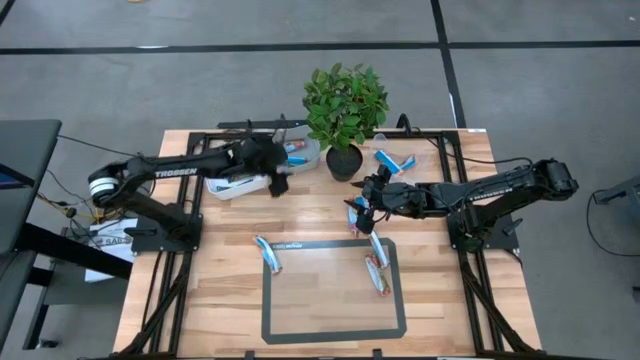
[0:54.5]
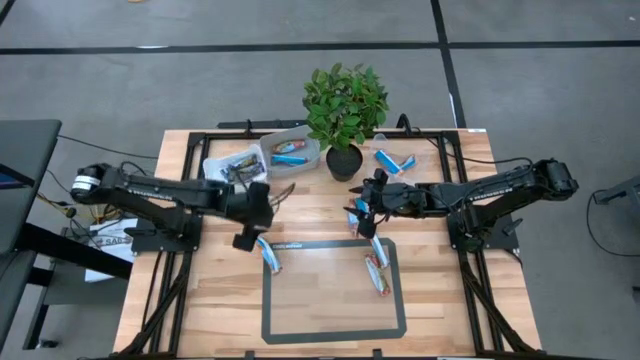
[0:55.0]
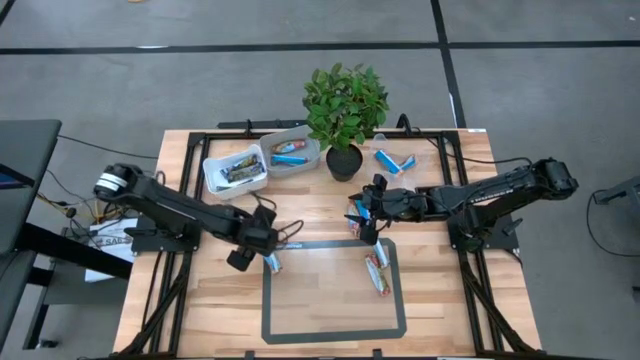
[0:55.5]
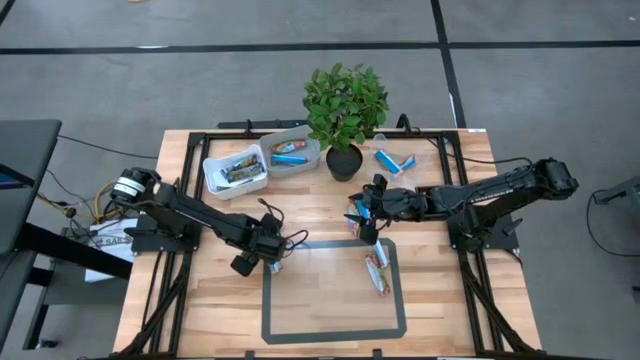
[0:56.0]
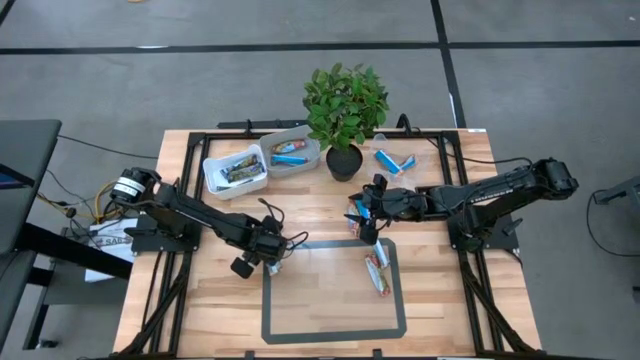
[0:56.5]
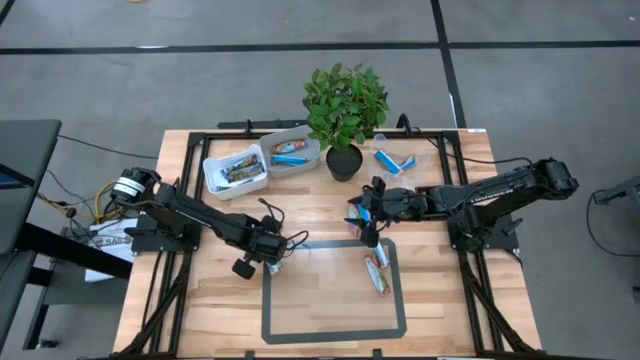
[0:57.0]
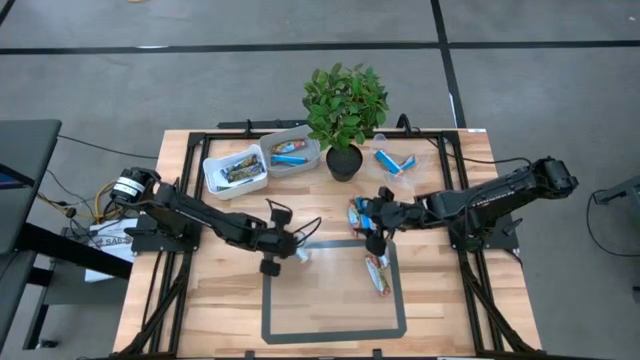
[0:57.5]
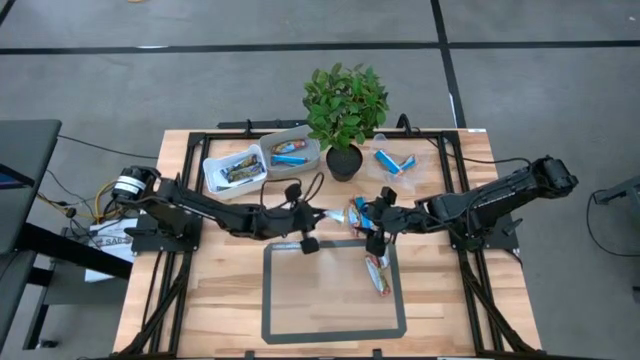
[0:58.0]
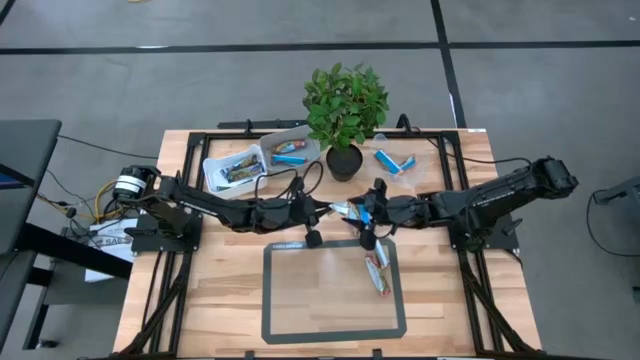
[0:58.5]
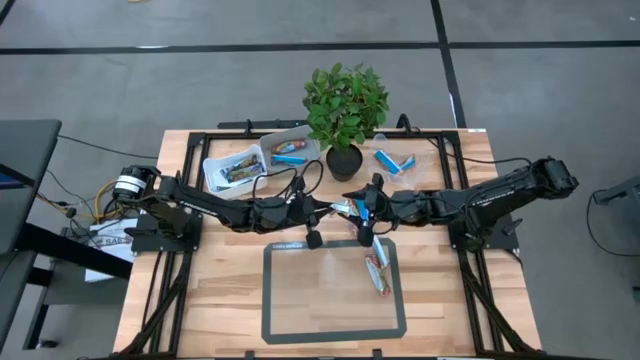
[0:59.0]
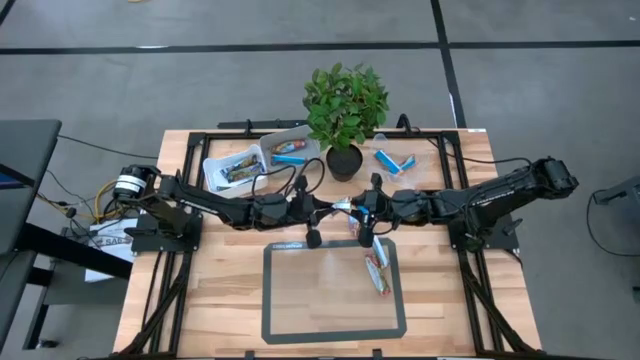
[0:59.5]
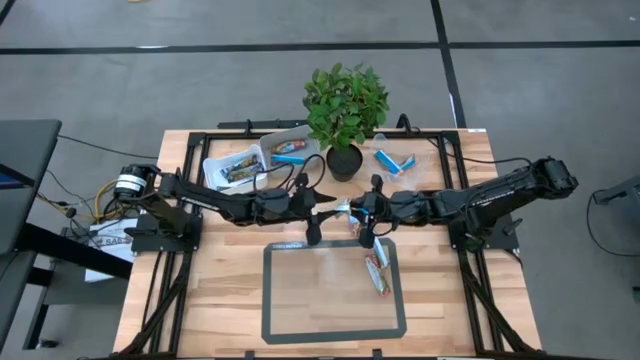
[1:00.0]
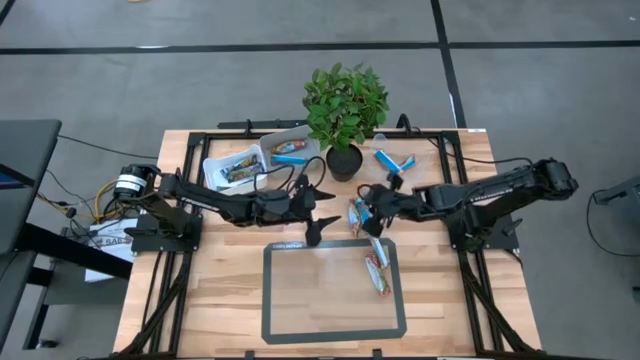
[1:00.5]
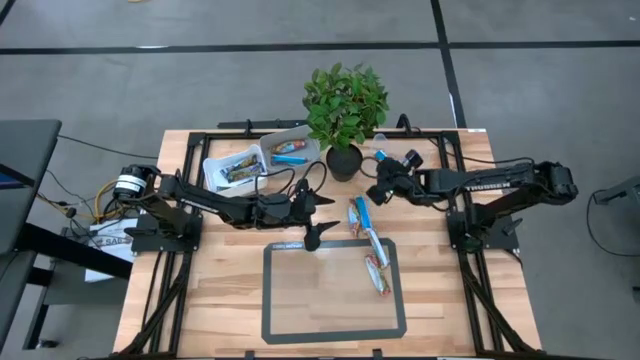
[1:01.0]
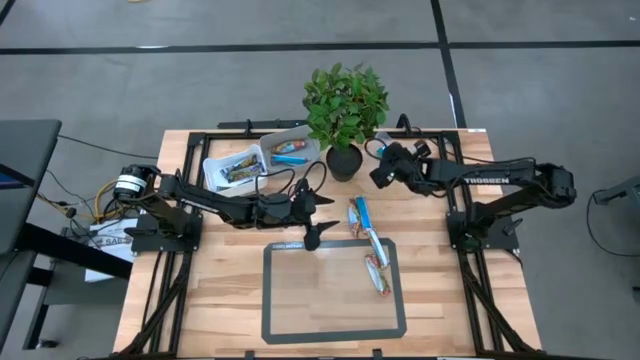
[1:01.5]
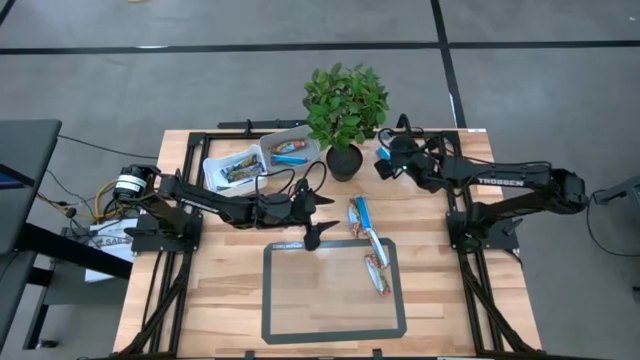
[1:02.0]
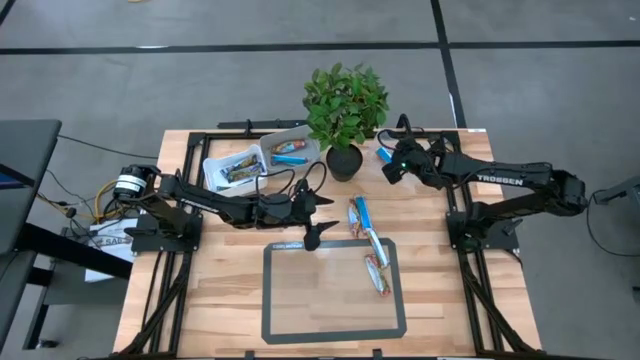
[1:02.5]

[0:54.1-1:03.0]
Task: Pick and place Granola Bars by type
Put the yellow granola bar into the transparent bin

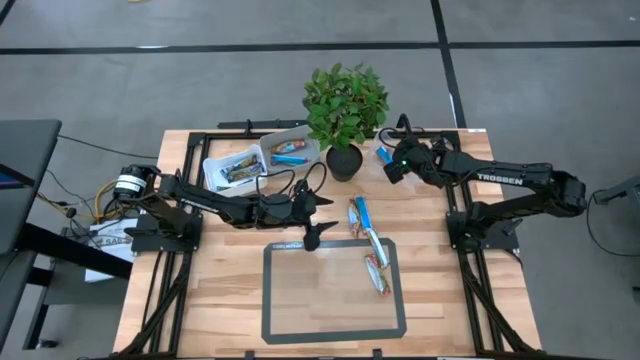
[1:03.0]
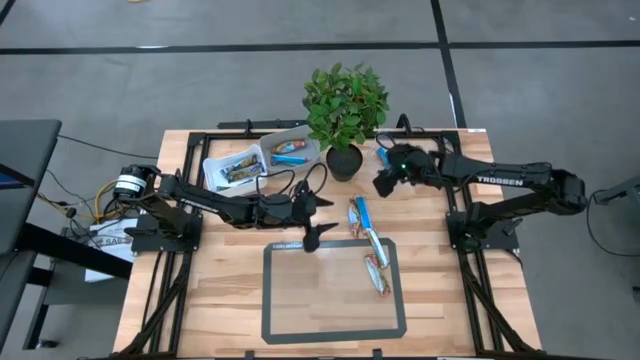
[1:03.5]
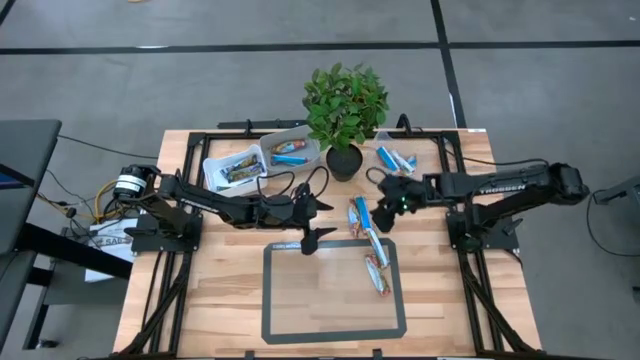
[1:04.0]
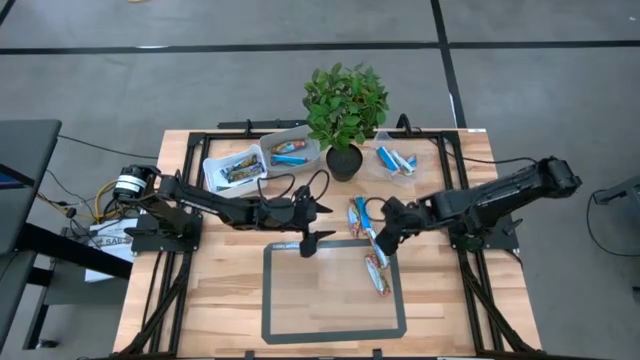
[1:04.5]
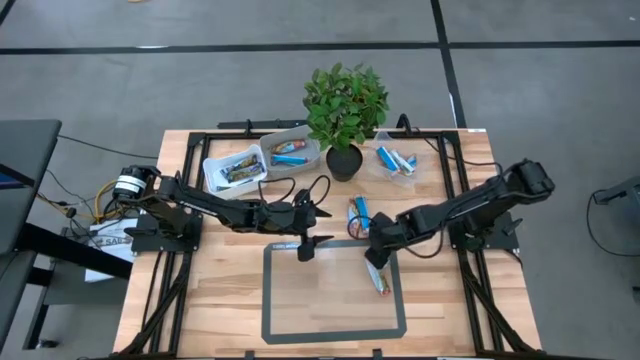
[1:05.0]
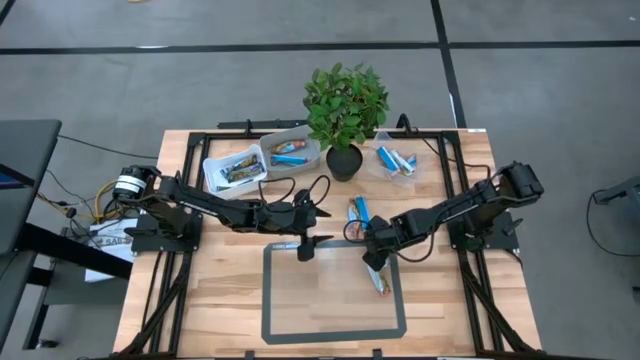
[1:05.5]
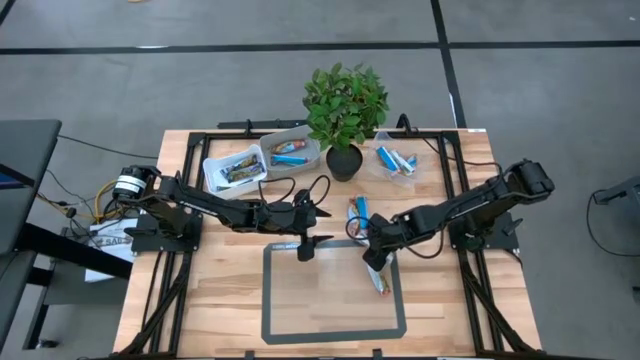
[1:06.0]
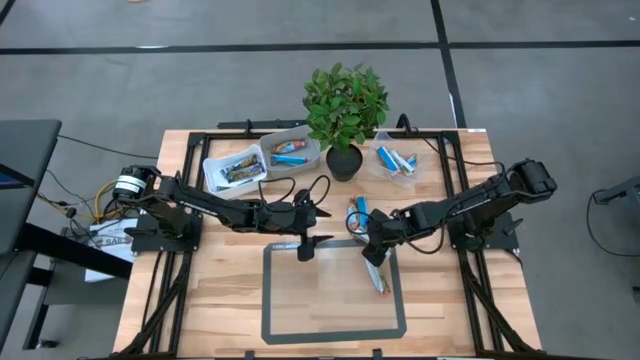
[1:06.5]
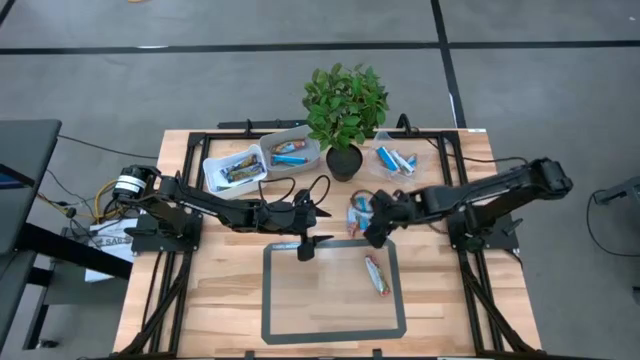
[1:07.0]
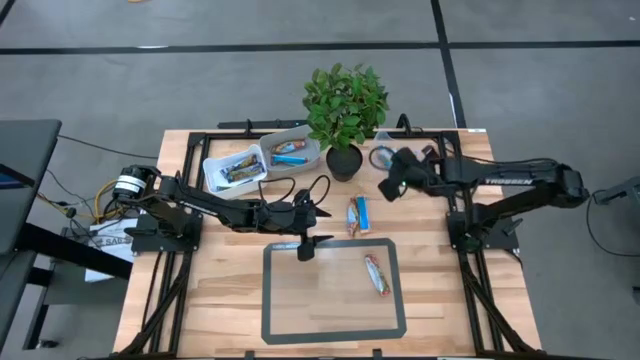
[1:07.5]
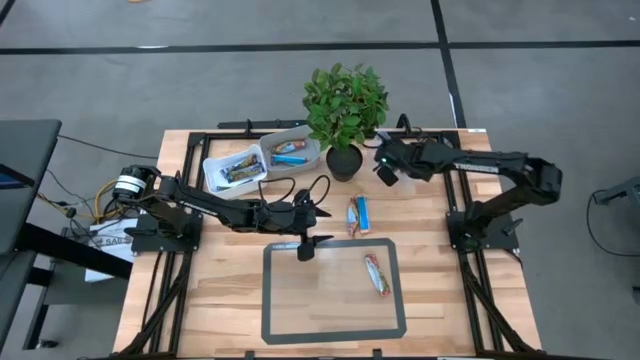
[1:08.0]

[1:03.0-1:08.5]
Put the yellow granola bar into the transparent bin

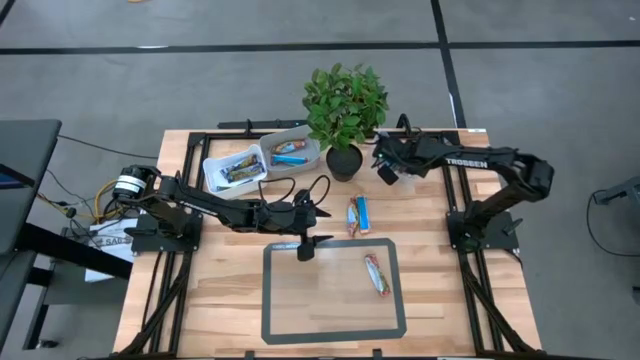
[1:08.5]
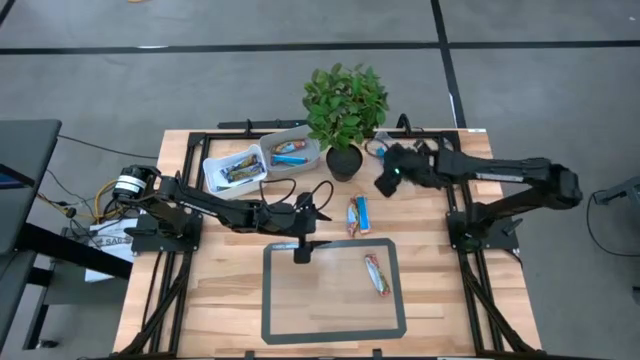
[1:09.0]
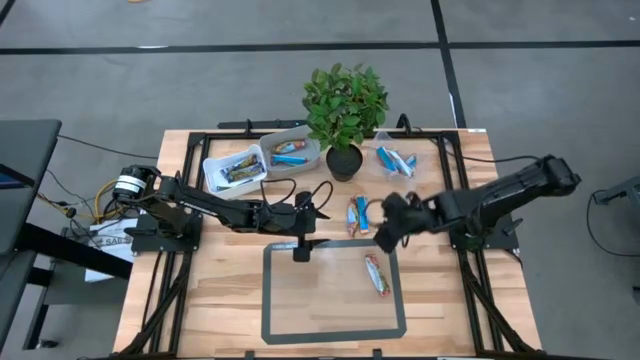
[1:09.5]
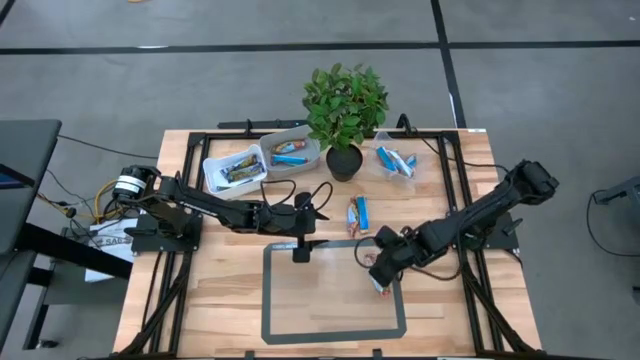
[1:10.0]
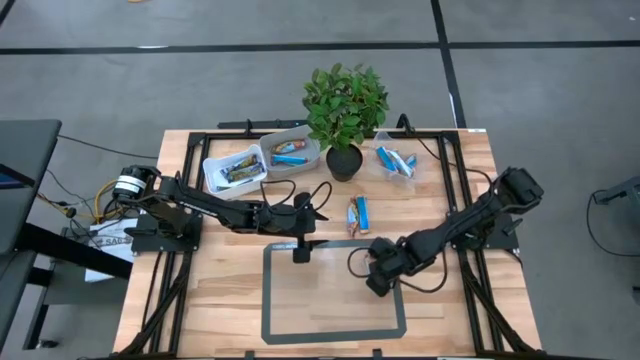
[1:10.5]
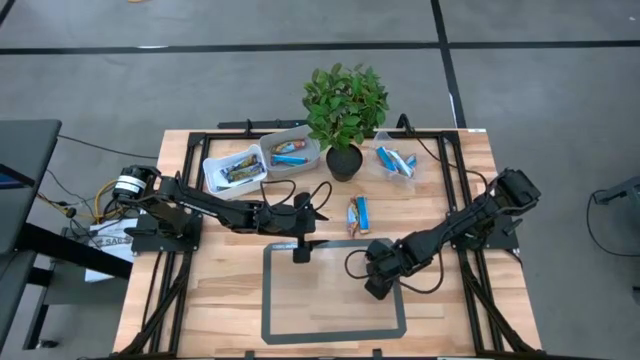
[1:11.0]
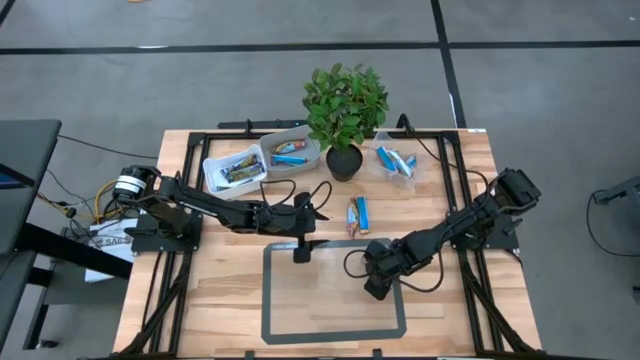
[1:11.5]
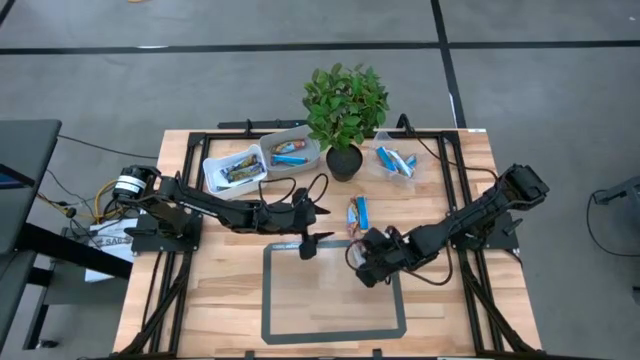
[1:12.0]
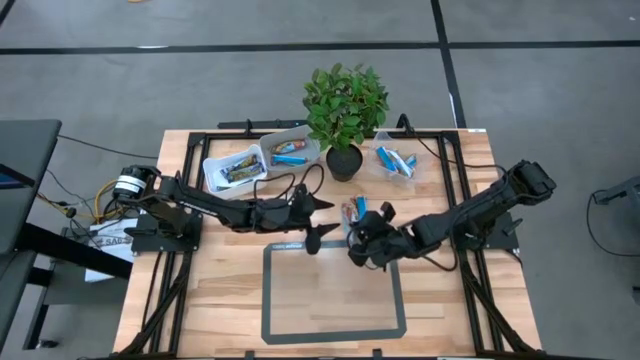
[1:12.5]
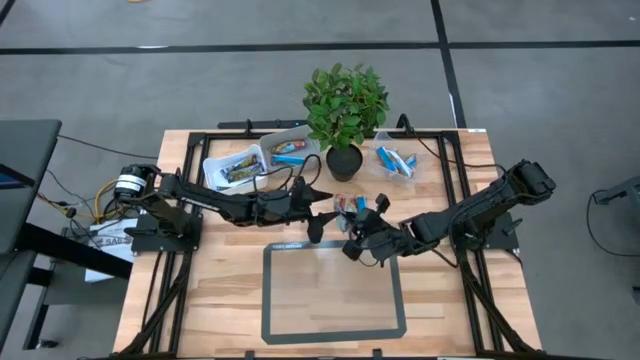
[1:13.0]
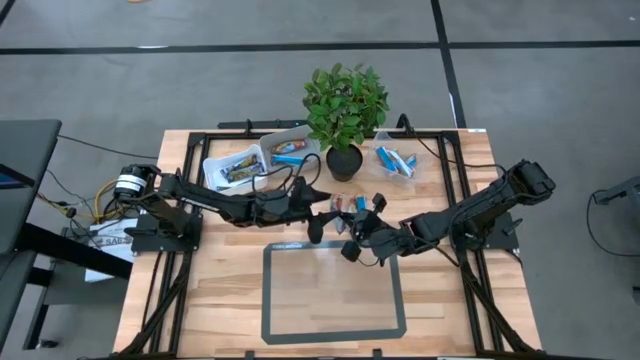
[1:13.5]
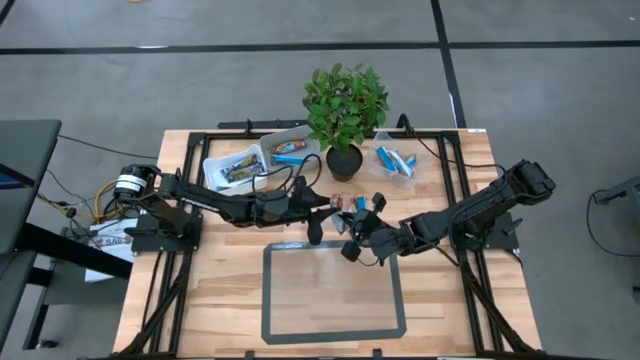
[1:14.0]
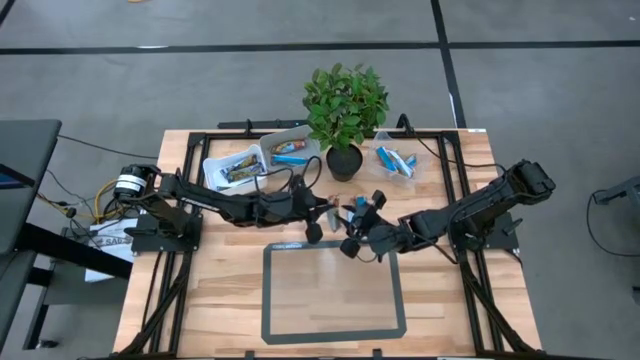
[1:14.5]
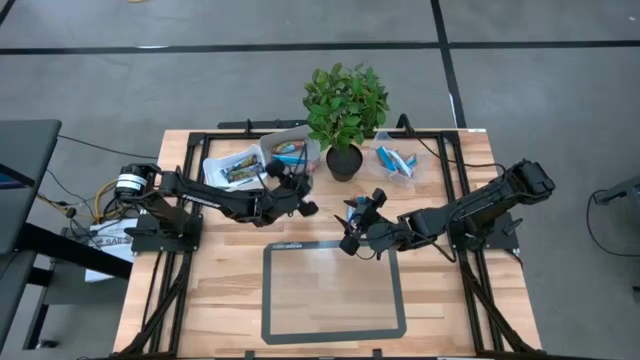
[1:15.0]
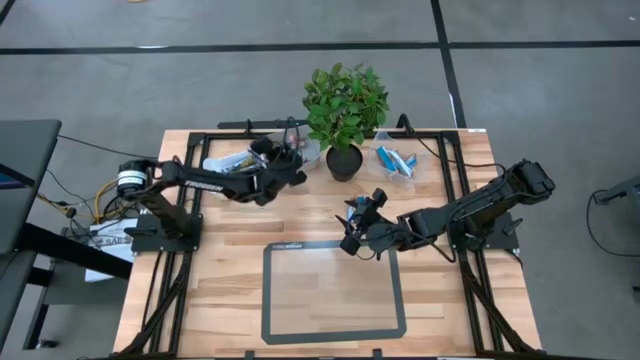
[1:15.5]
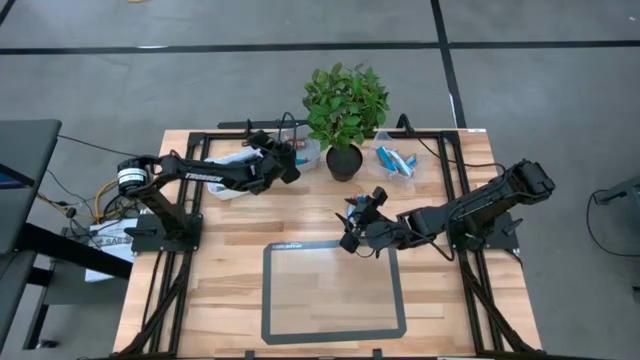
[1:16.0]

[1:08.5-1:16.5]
Put the red granola bar into the gray bin
